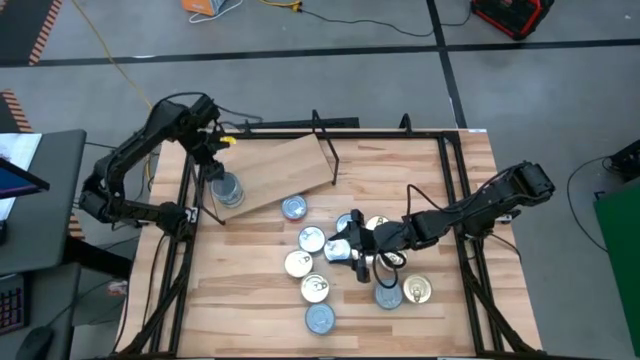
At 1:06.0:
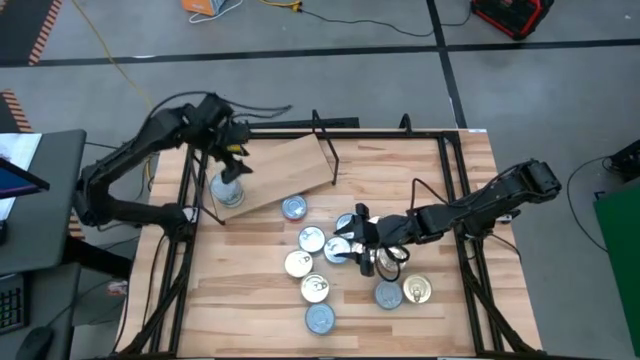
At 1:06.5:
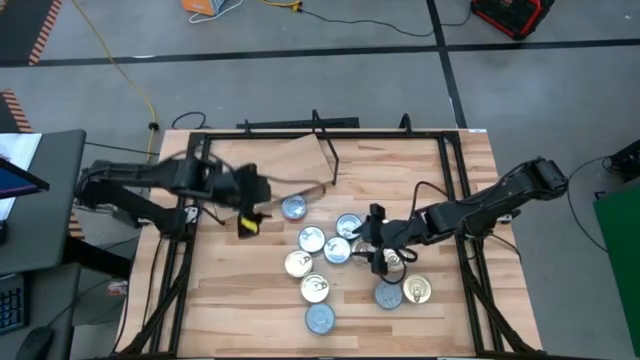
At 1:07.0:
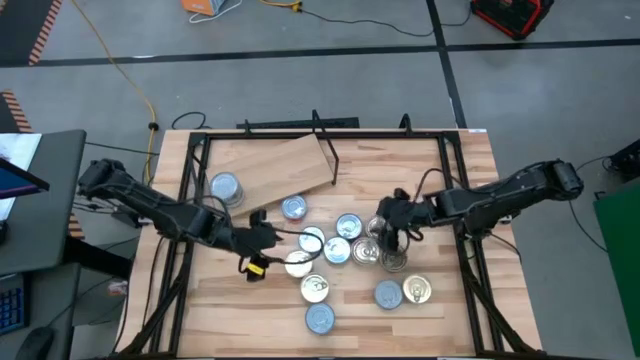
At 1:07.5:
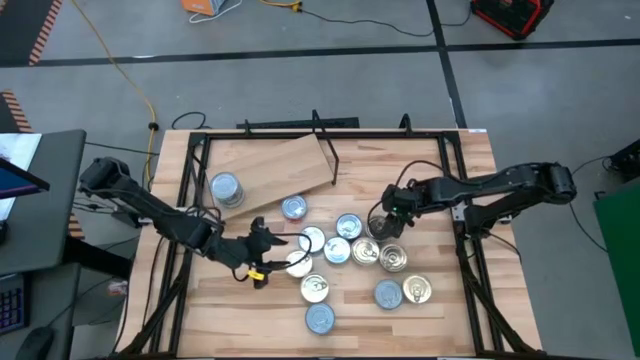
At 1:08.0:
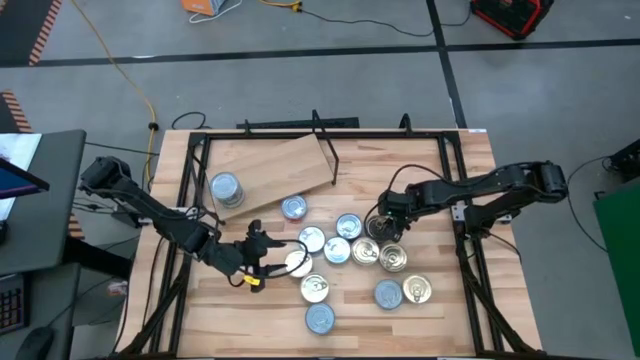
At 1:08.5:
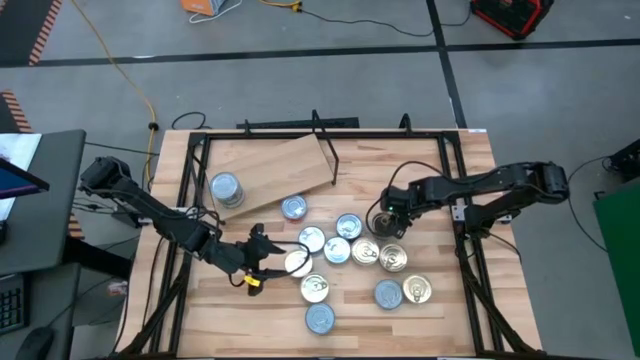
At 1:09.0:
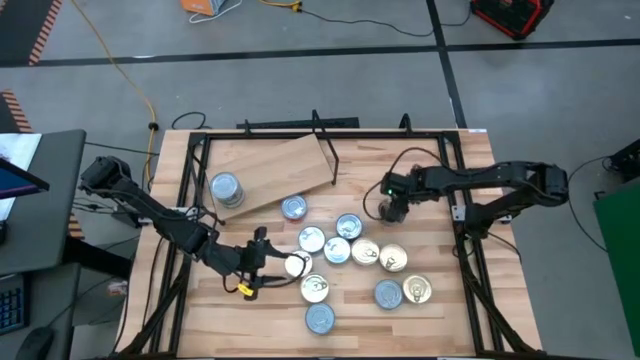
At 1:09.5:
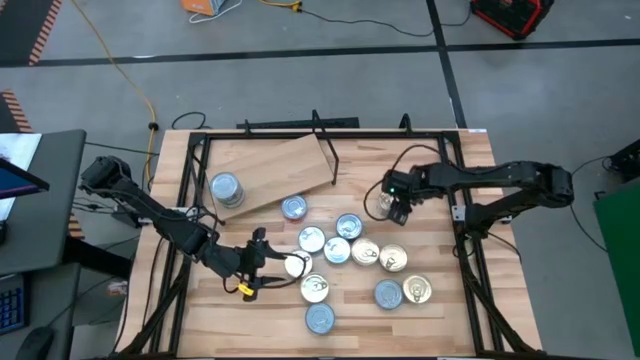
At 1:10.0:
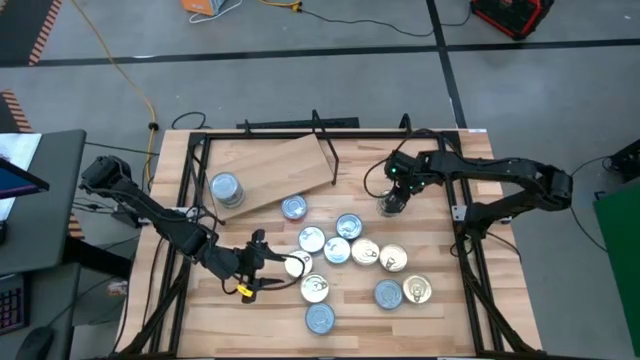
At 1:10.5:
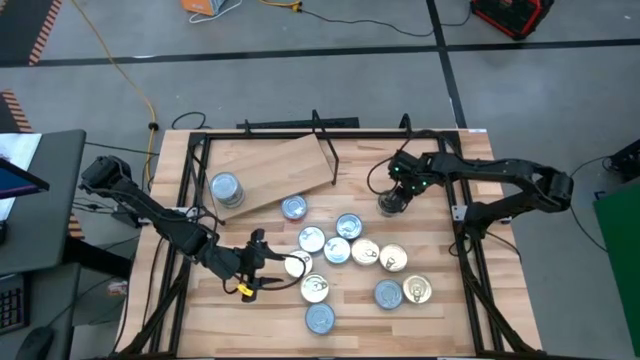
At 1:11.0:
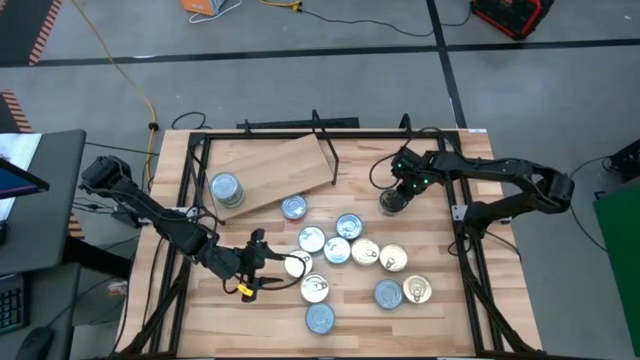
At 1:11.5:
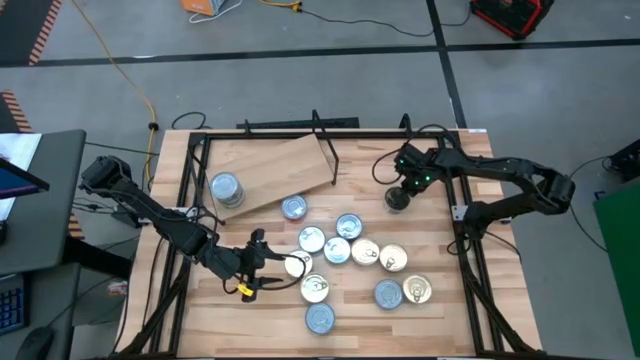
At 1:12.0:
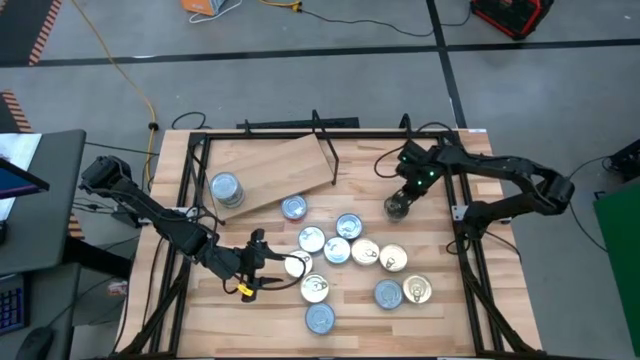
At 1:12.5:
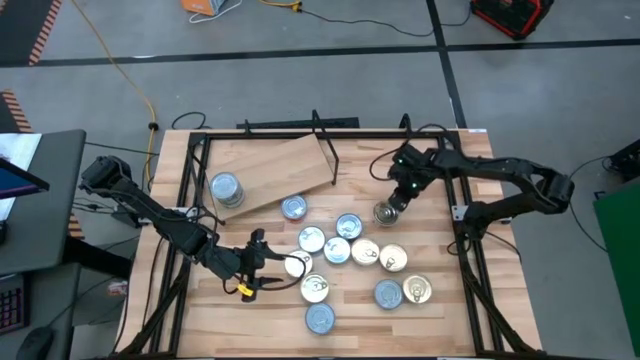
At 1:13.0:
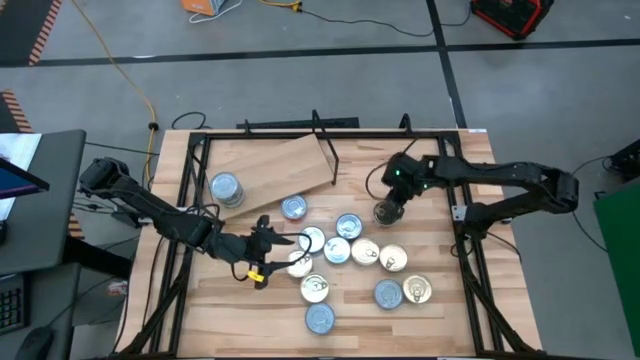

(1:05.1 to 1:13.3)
Task: Stack canned seafood by type on shelf
Put the blue pink tuna can on the shelf

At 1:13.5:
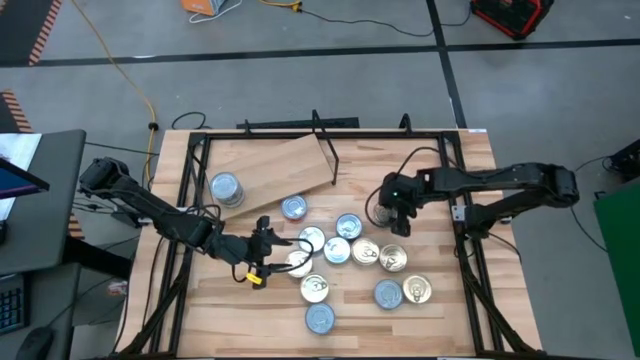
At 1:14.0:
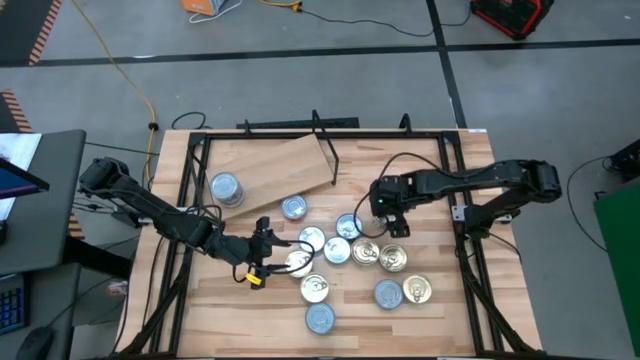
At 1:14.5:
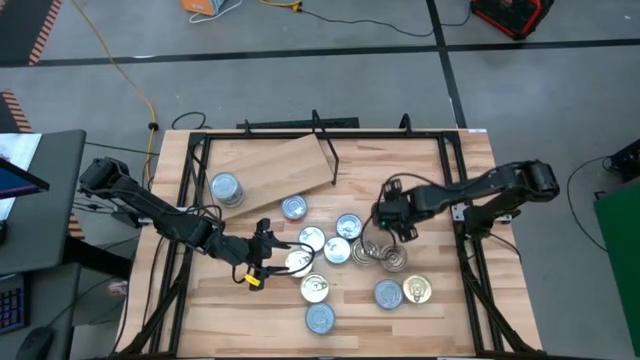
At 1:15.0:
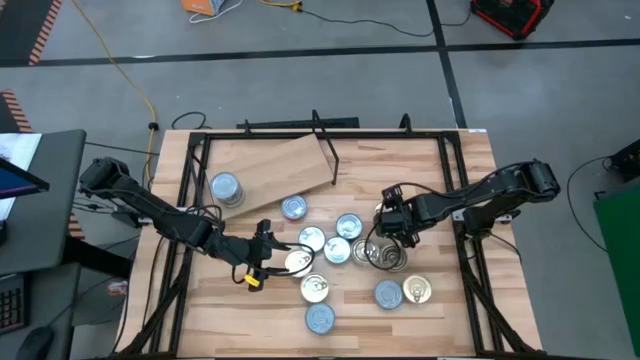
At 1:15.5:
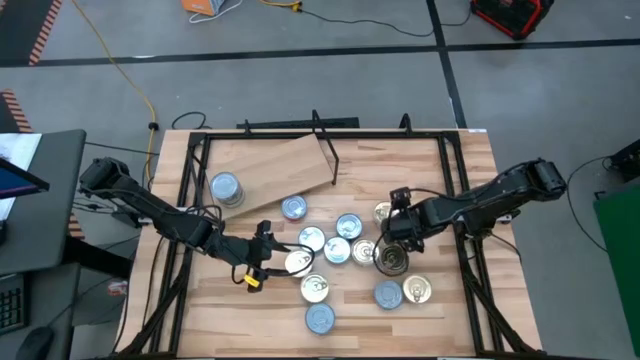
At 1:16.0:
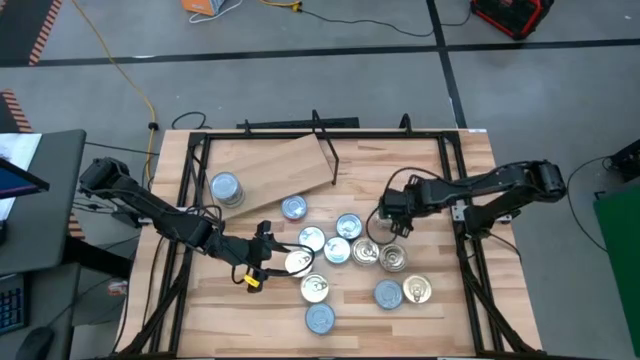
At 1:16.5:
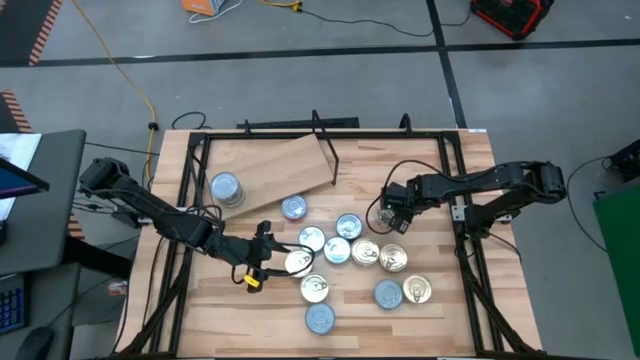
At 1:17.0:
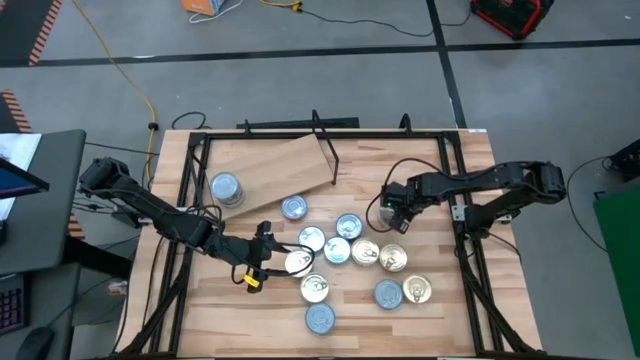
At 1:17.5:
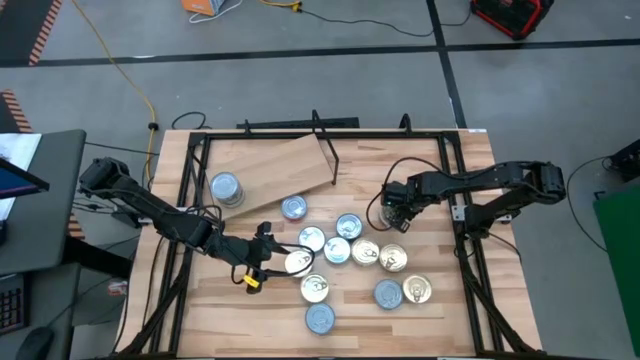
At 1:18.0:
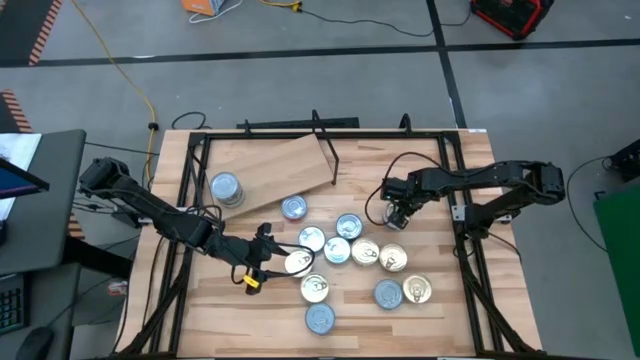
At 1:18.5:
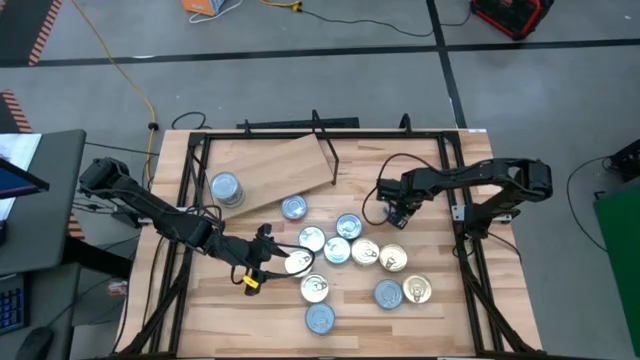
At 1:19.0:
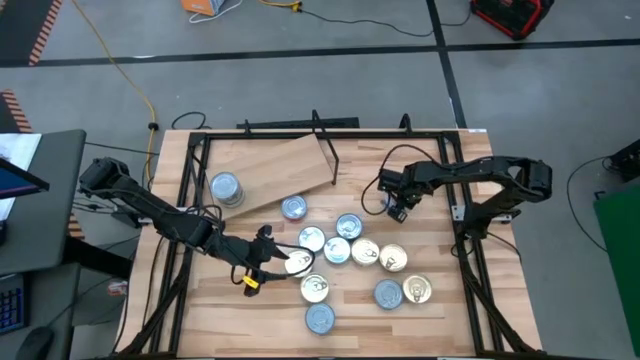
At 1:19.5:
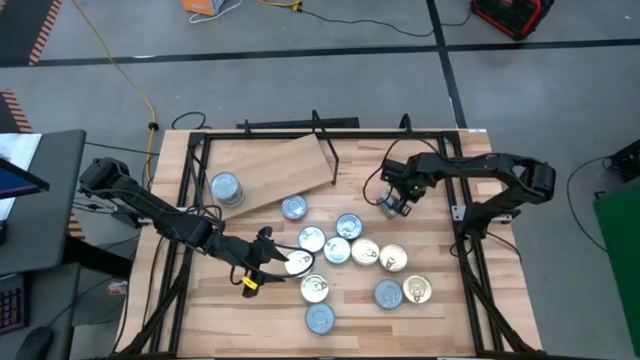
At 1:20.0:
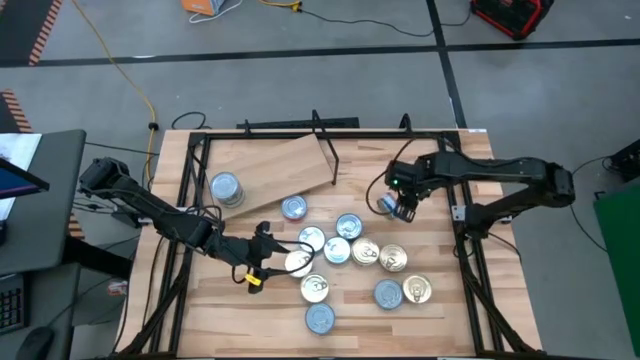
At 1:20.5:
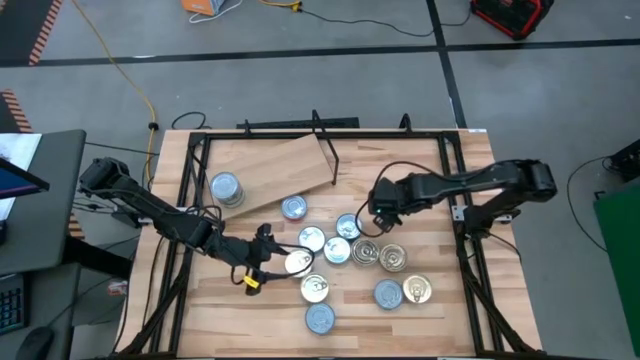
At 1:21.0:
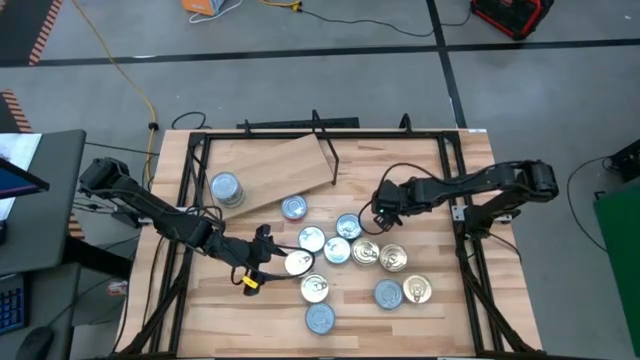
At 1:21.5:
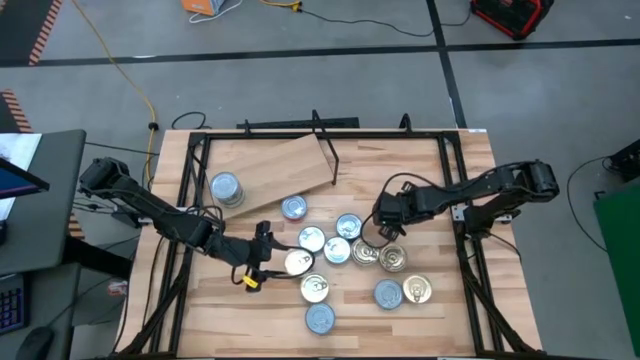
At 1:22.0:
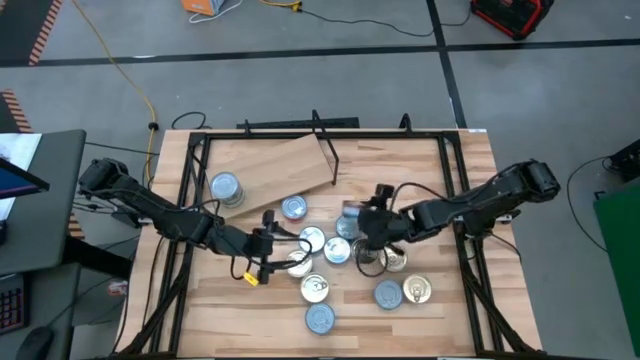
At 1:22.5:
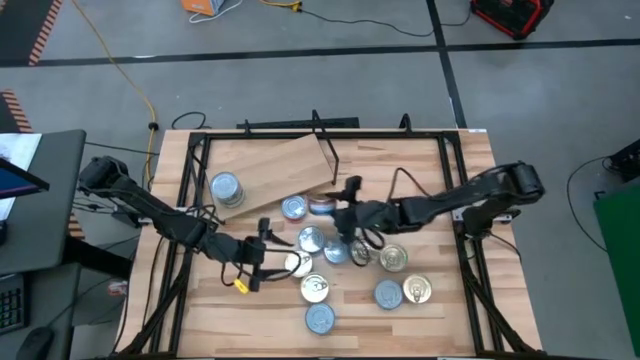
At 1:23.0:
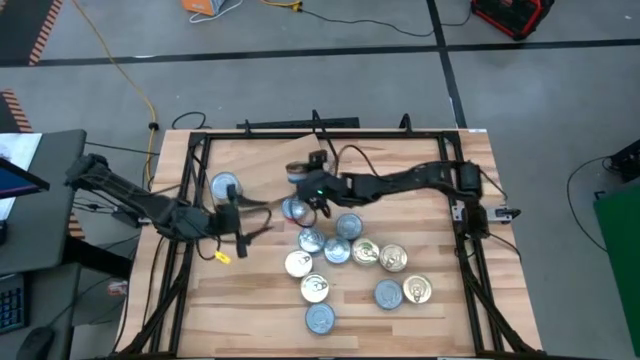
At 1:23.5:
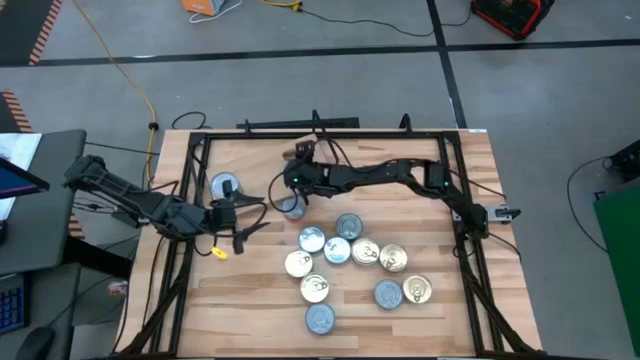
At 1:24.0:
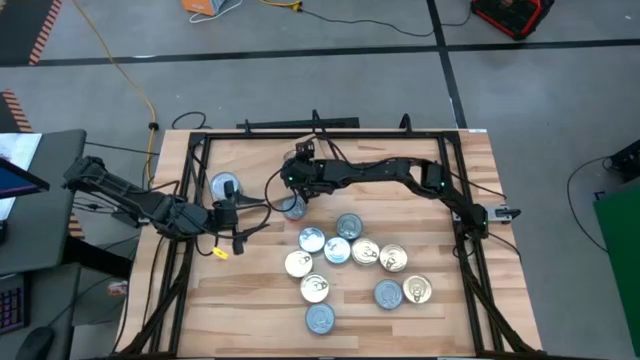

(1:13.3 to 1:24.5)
Put the blue pink tuna can on the shelf

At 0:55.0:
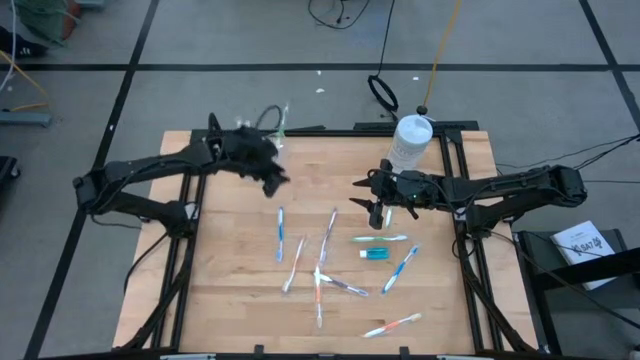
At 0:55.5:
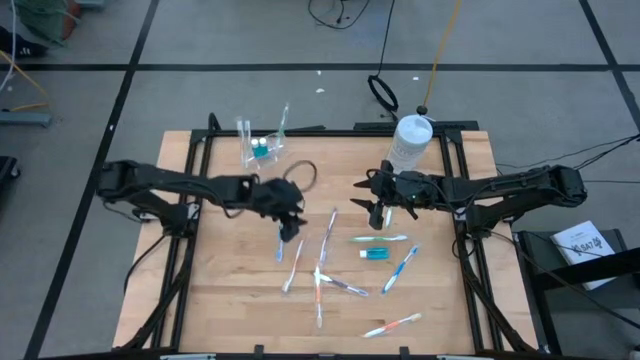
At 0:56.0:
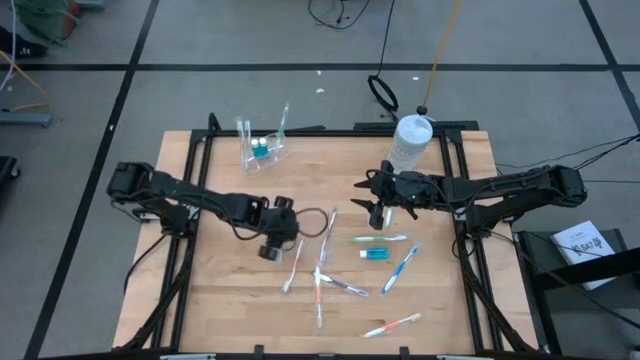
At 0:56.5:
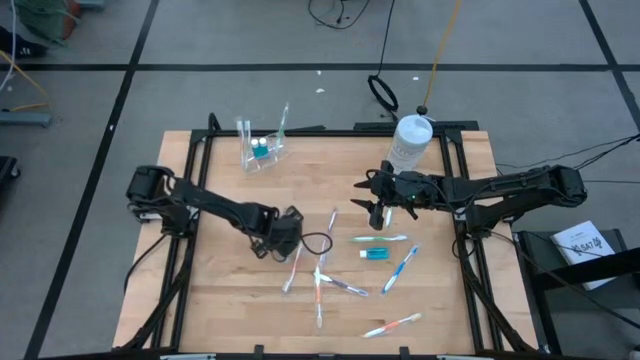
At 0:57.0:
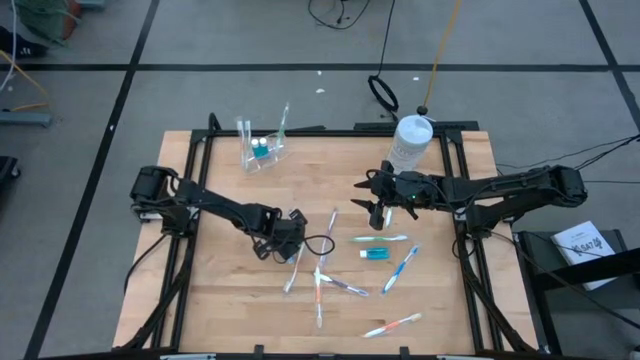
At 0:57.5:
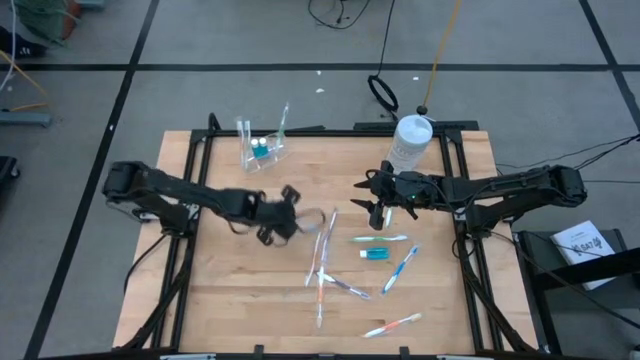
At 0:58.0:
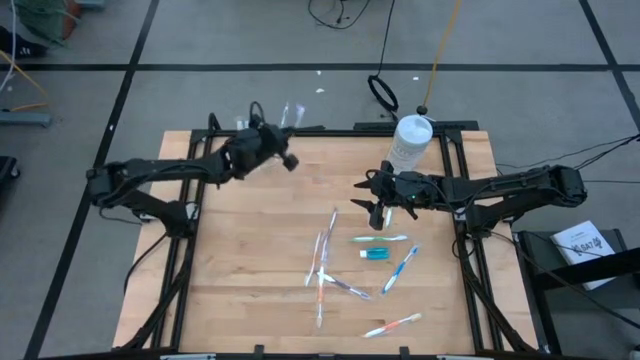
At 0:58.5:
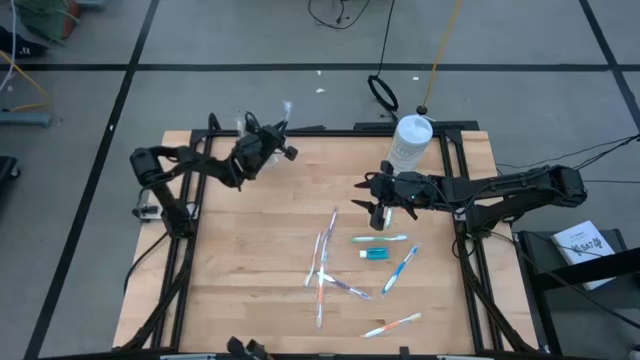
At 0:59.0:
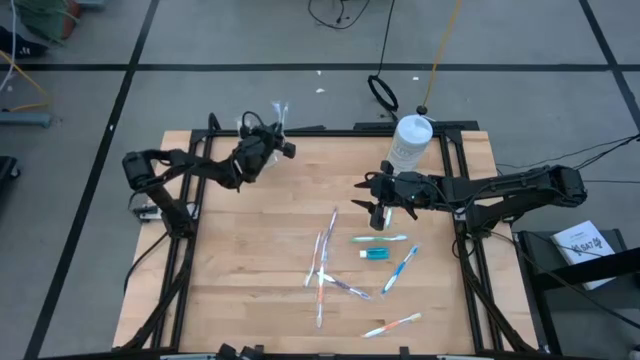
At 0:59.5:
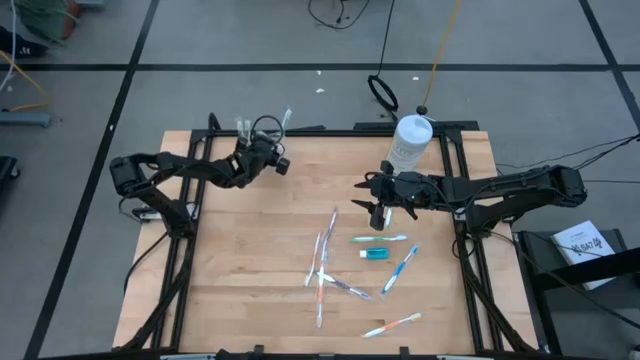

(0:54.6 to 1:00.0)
Task: Pick & Place toothbrushing station
Put the blue toothbrush into the transparent organizer
